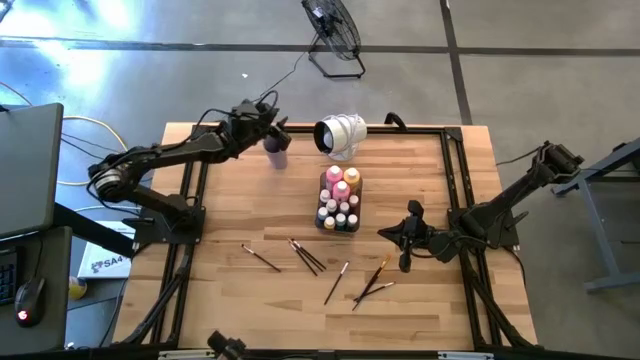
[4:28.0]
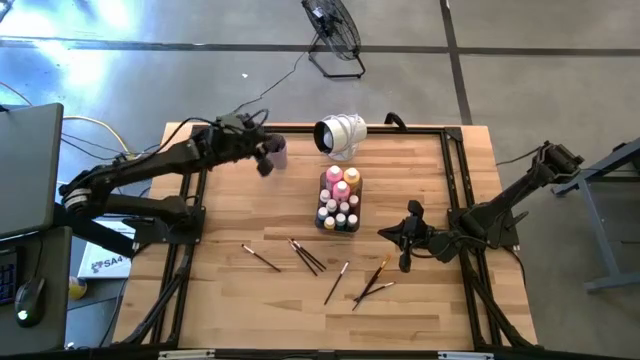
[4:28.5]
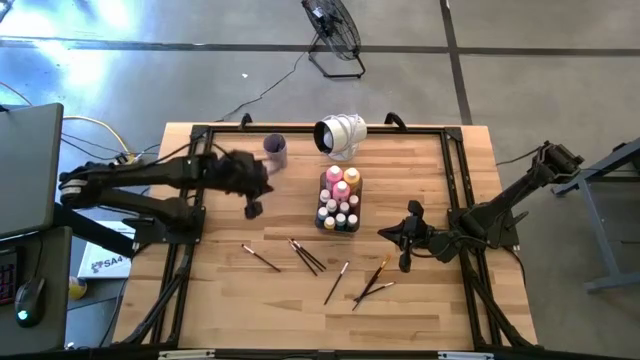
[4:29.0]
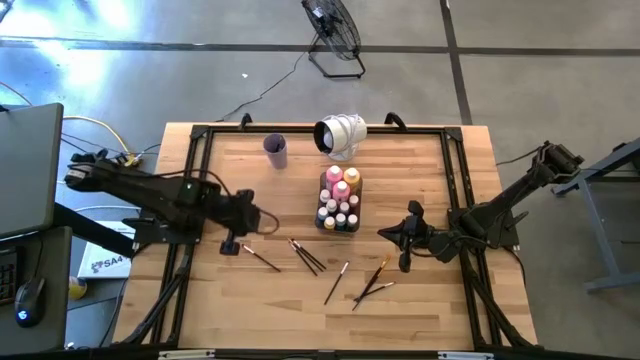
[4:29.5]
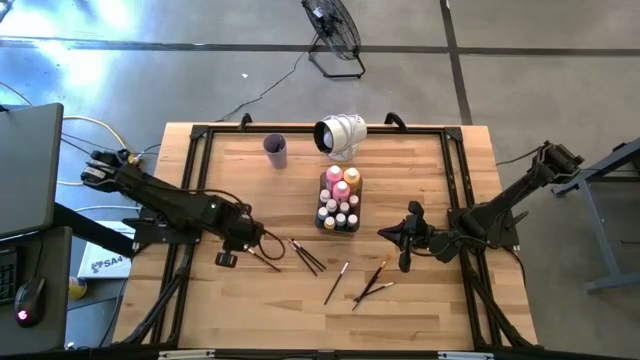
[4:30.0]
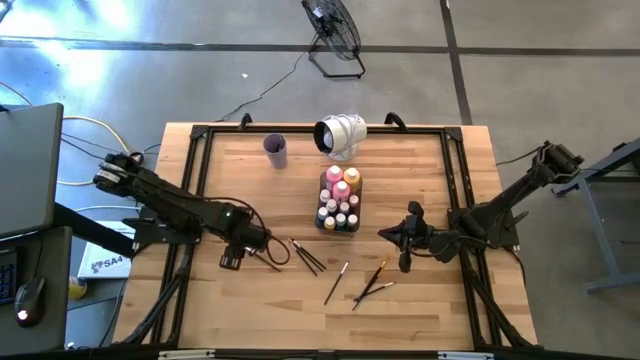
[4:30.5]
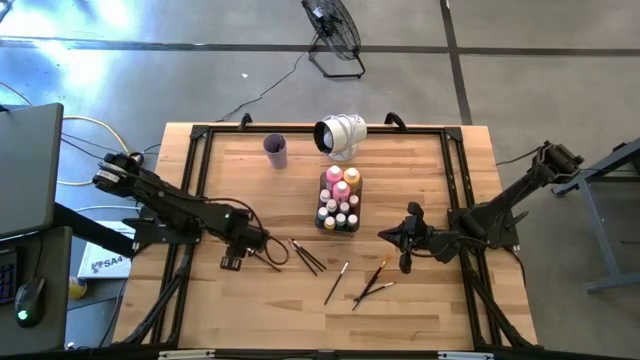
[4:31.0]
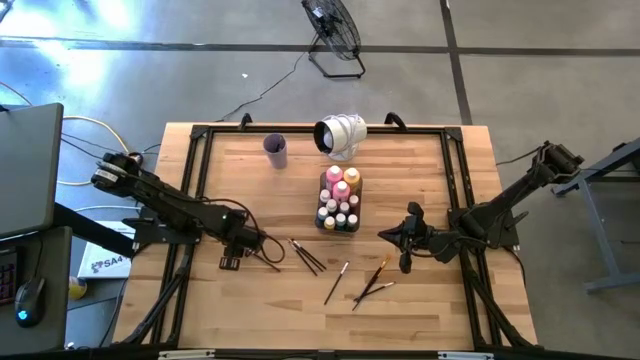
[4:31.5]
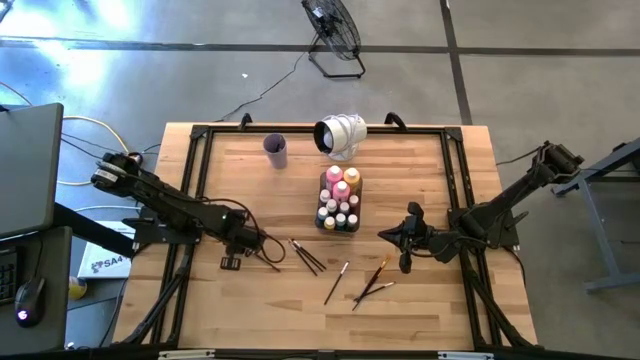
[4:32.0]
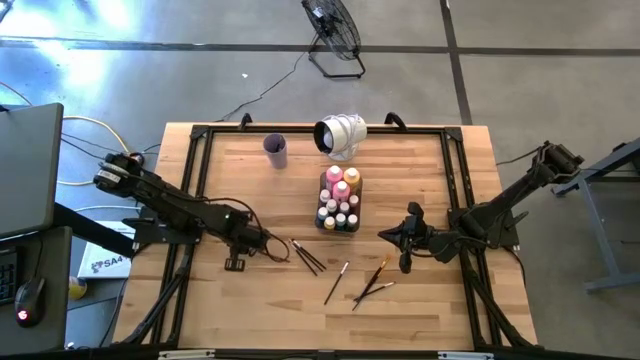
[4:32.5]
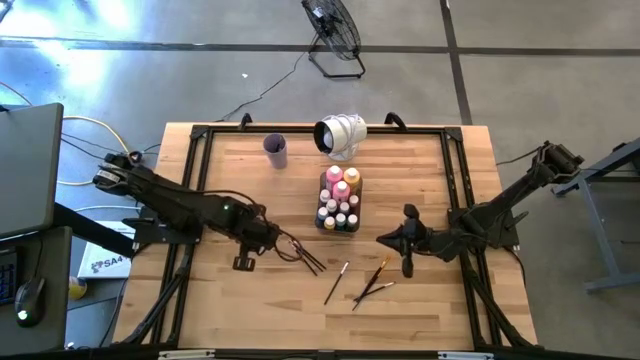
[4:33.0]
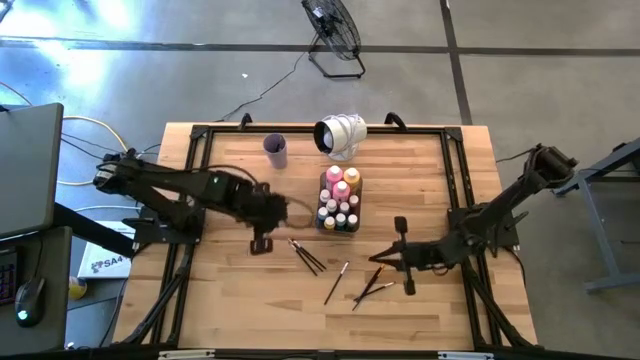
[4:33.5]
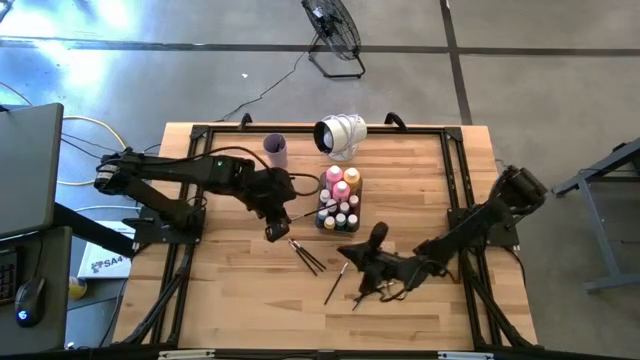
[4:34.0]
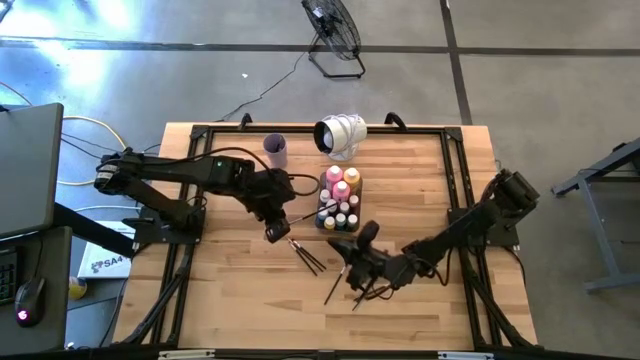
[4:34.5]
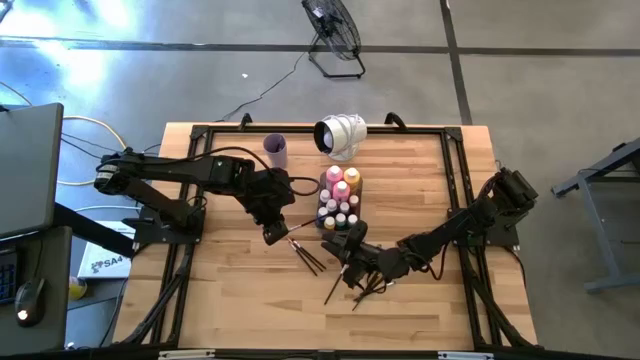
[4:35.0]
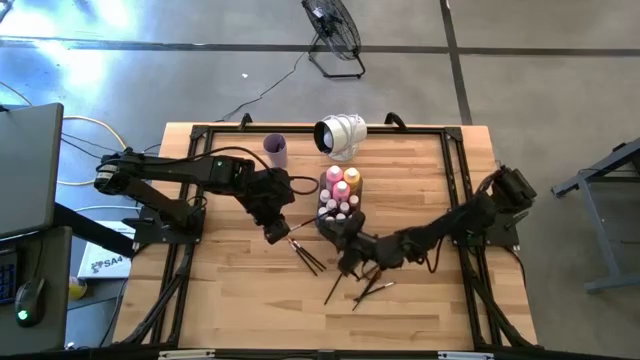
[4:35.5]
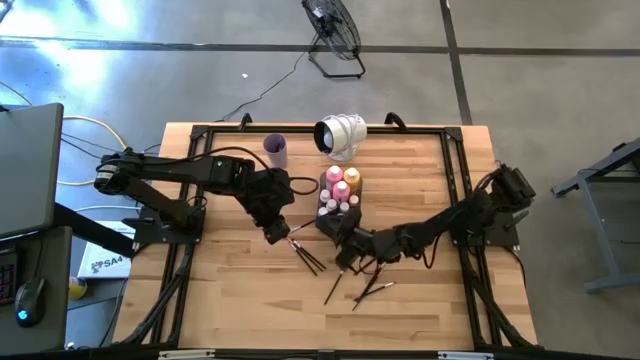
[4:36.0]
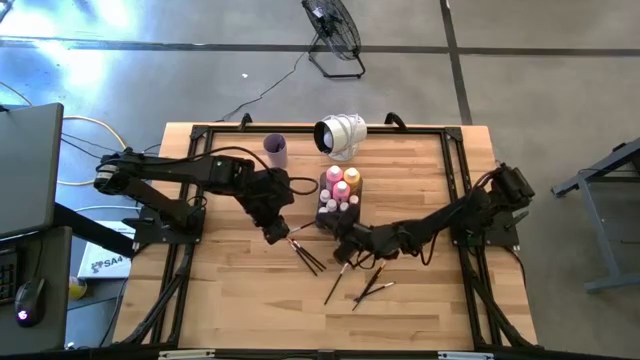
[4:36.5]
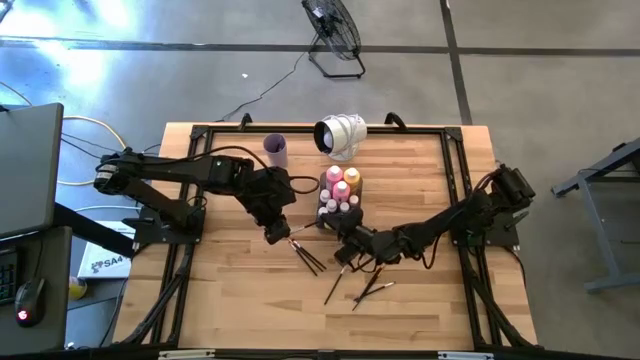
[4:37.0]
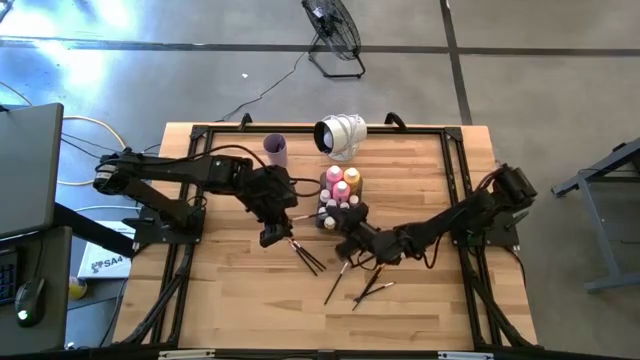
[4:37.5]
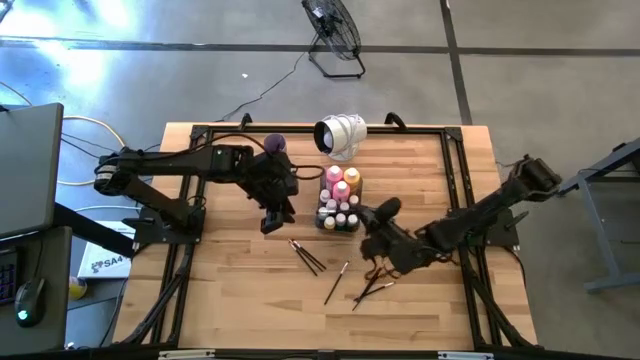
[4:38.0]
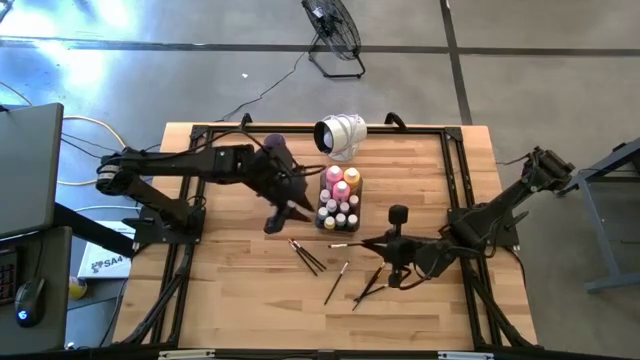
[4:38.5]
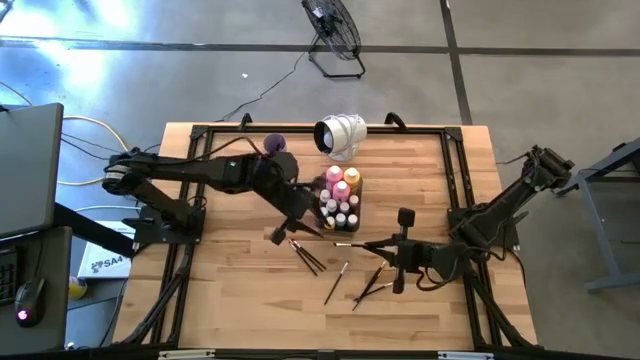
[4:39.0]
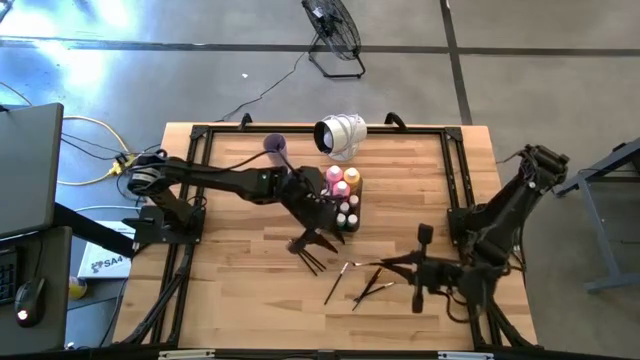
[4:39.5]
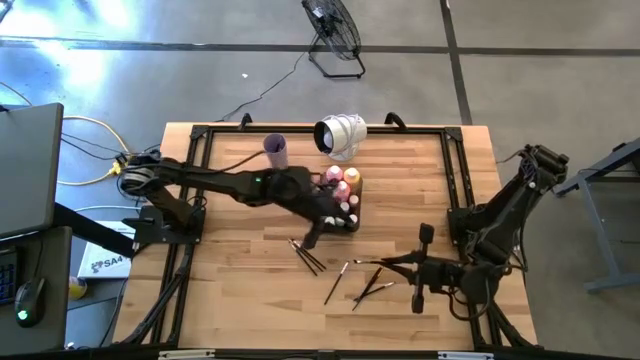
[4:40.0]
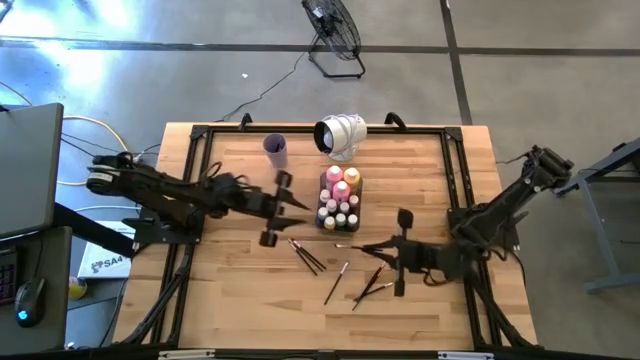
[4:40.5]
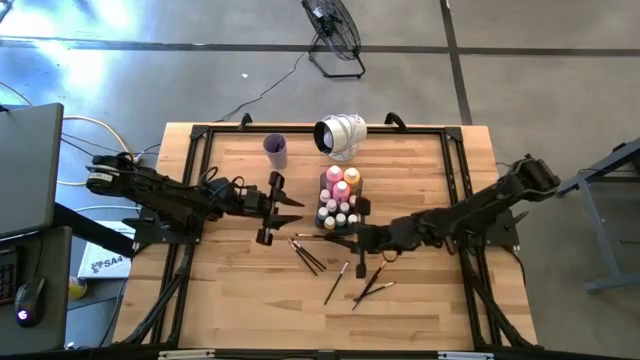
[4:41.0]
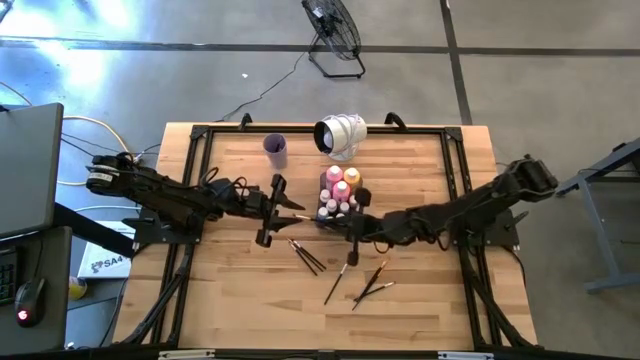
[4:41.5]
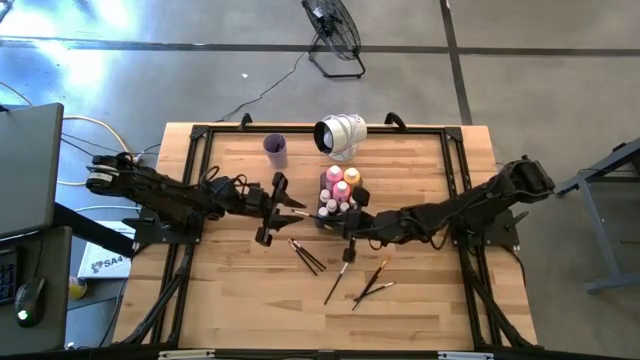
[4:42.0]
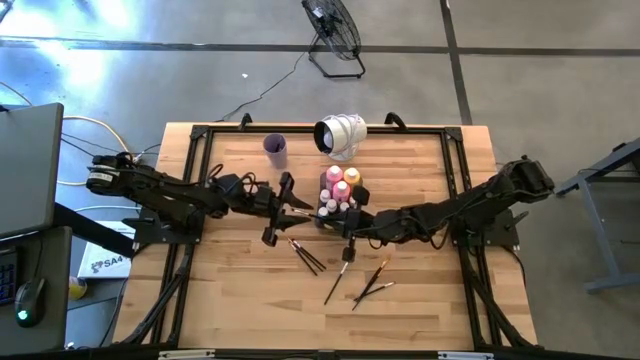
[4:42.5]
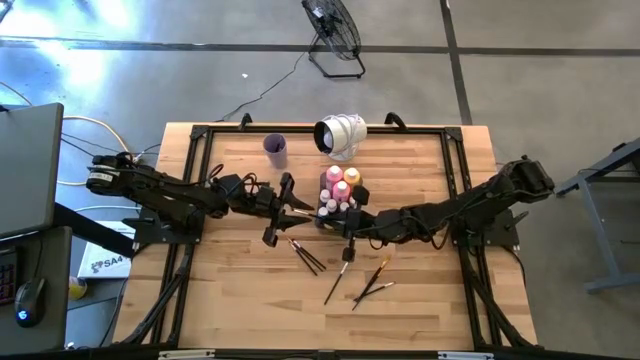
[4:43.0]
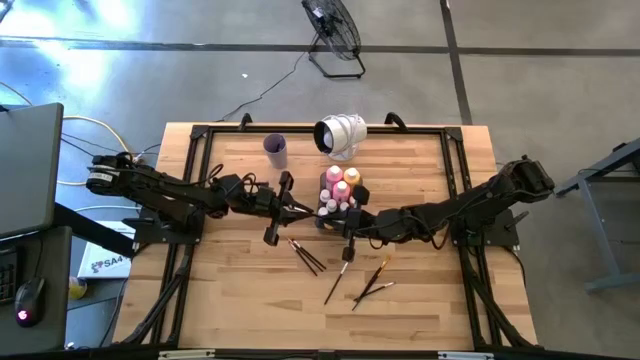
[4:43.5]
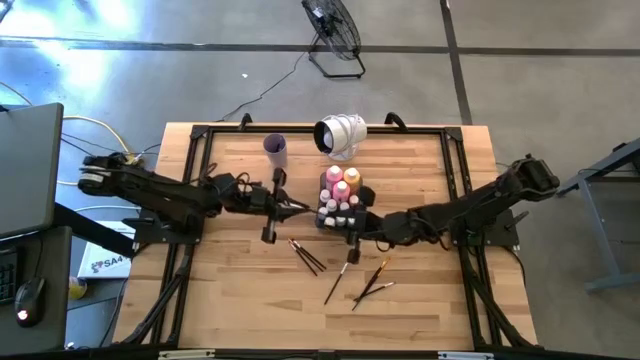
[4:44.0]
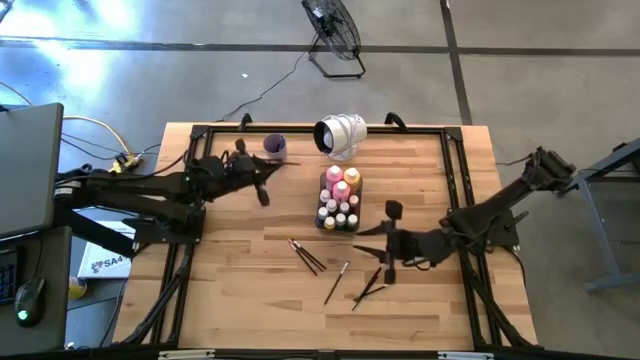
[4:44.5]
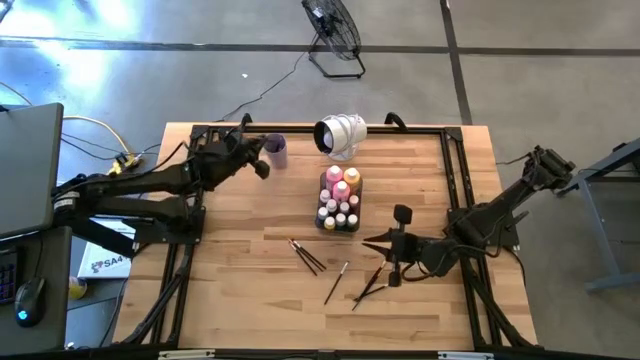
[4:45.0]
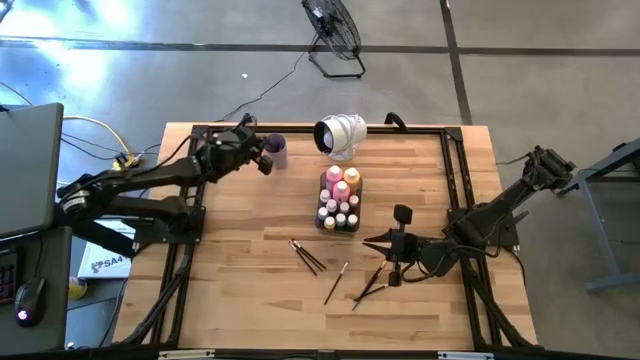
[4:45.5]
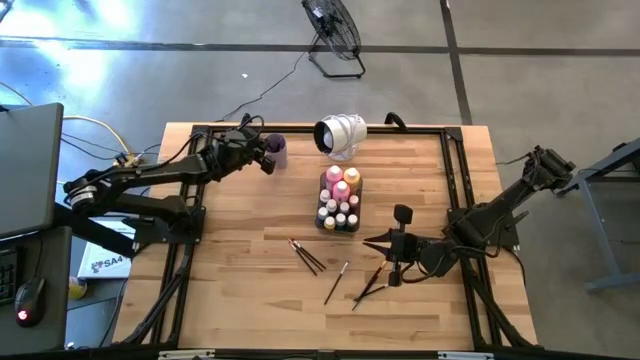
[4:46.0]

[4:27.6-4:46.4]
Task: Pick & Place Paint Supplies
Put the silver paint brush into the violet cup

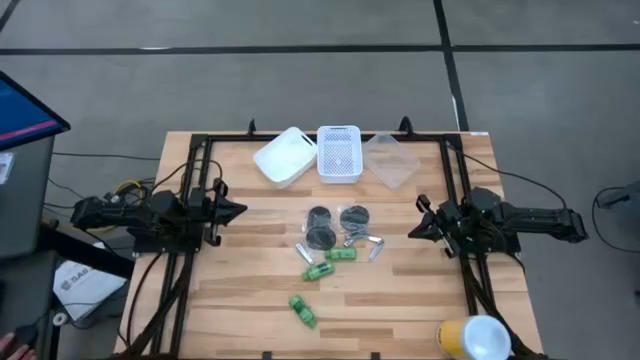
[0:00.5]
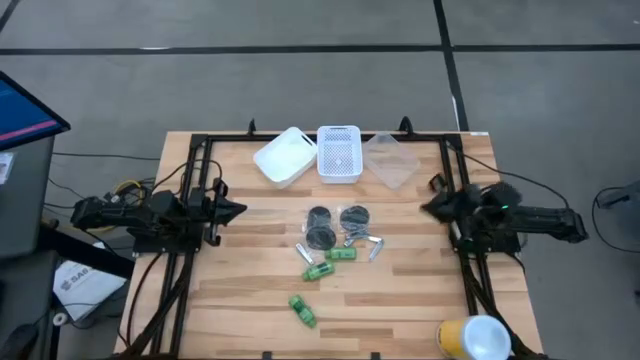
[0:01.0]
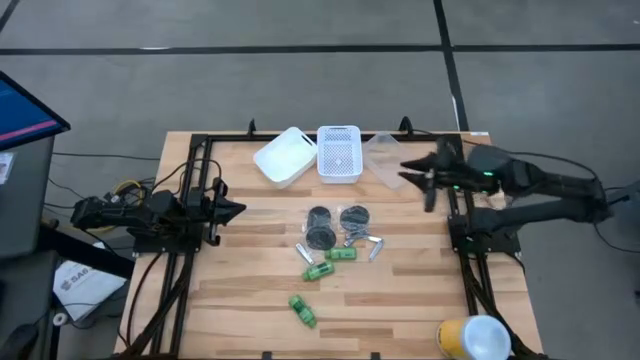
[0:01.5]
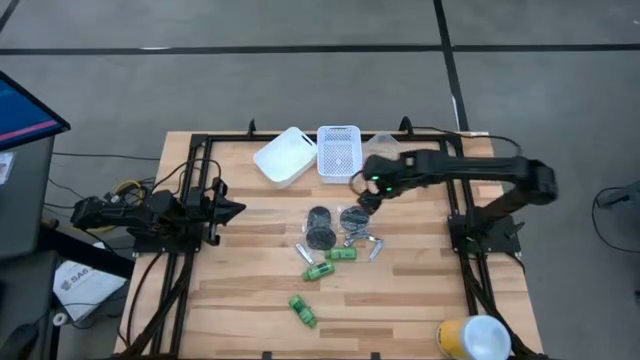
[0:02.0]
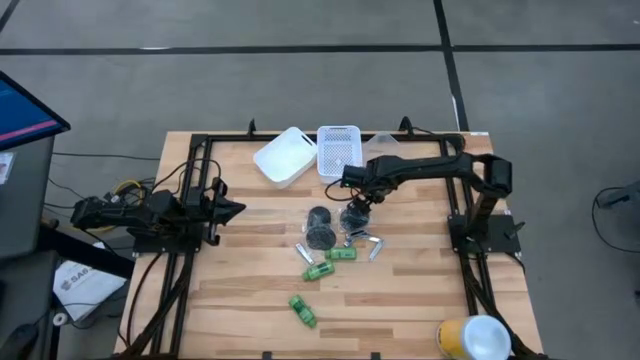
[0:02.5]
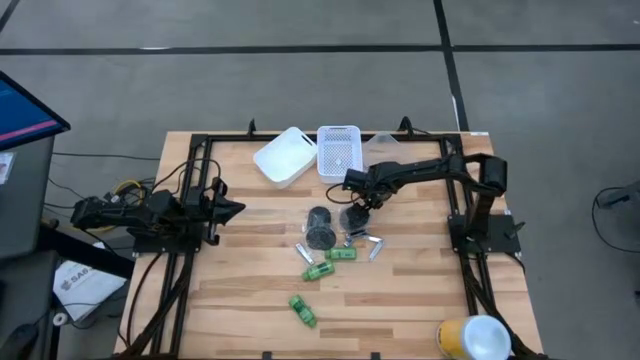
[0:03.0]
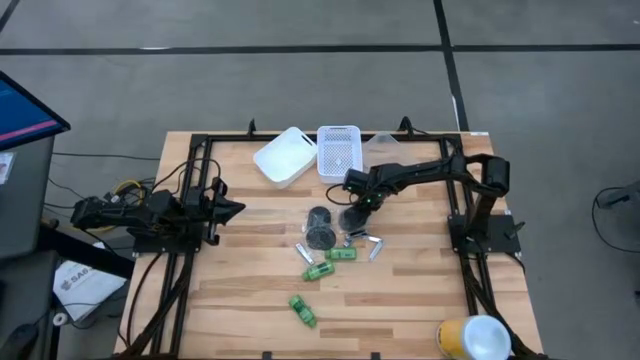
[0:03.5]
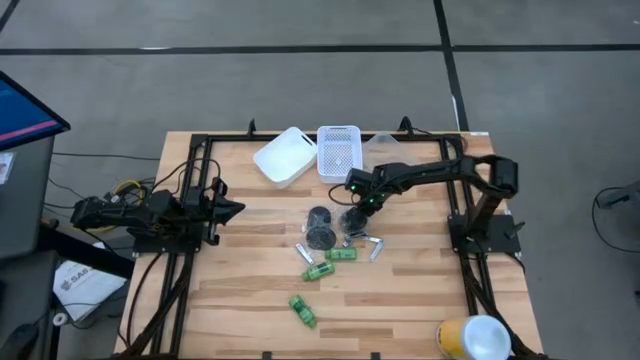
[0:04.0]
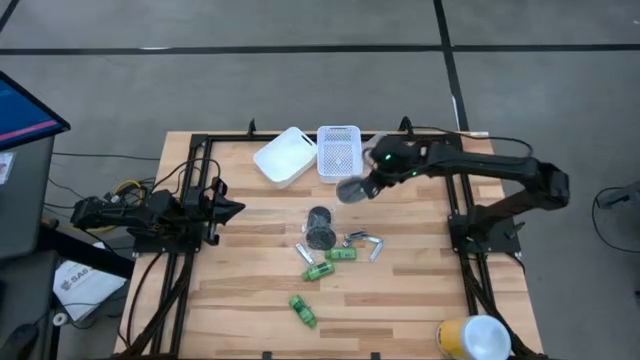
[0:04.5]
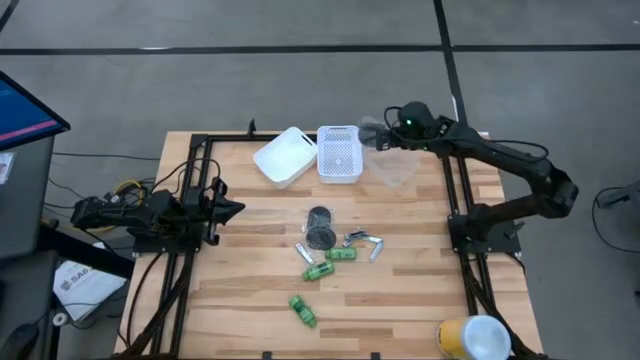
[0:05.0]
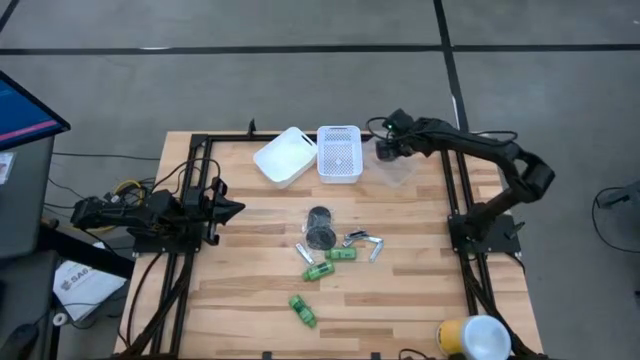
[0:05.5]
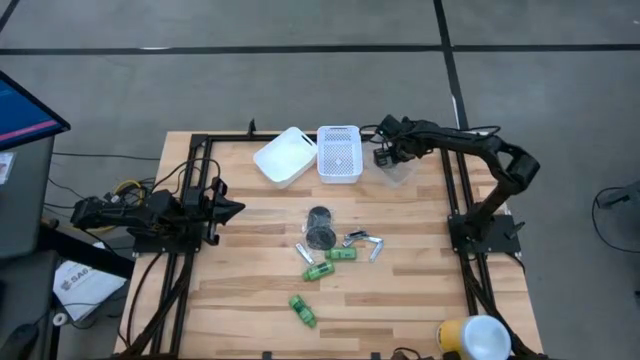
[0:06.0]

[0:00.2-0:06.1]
Task: Pick & Place Travel size toiletries
Put the black hairbrush into the transparent bin
